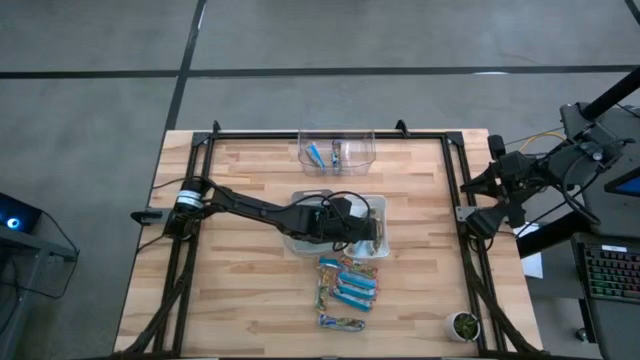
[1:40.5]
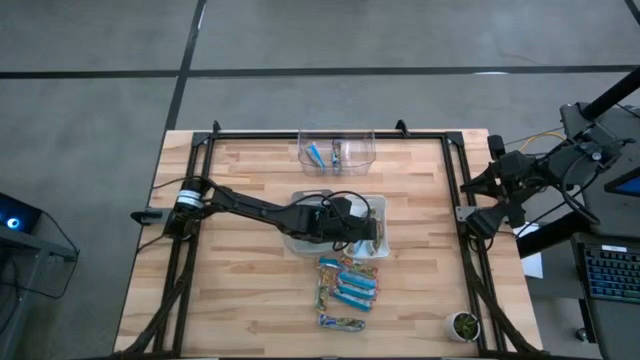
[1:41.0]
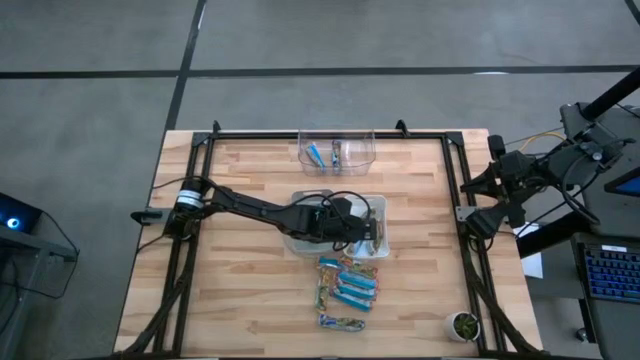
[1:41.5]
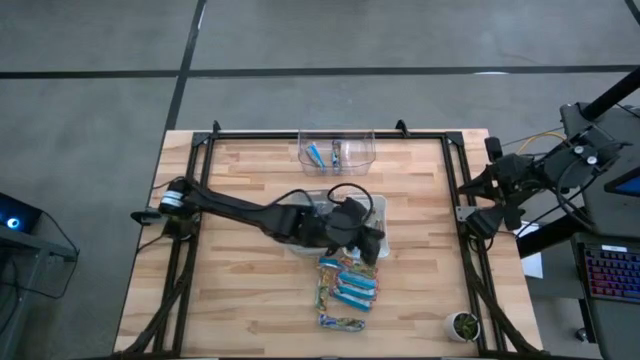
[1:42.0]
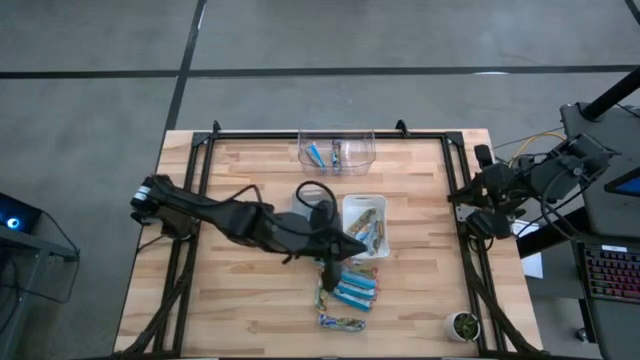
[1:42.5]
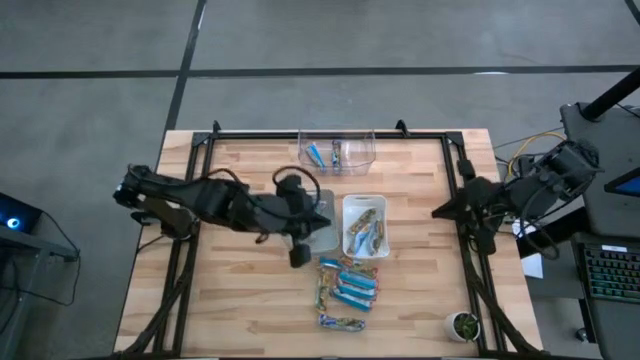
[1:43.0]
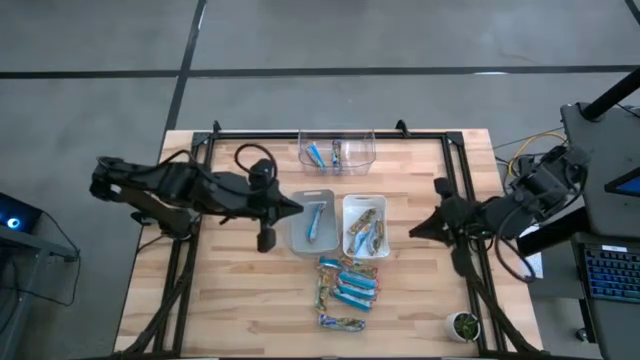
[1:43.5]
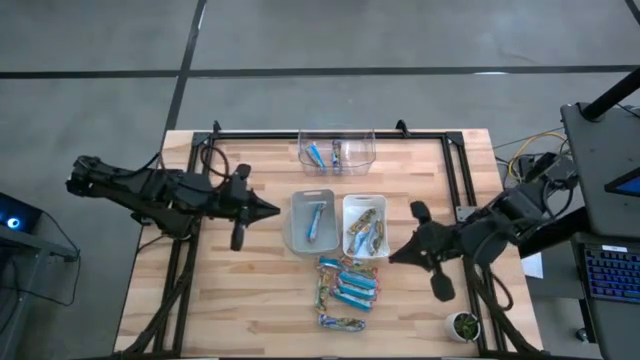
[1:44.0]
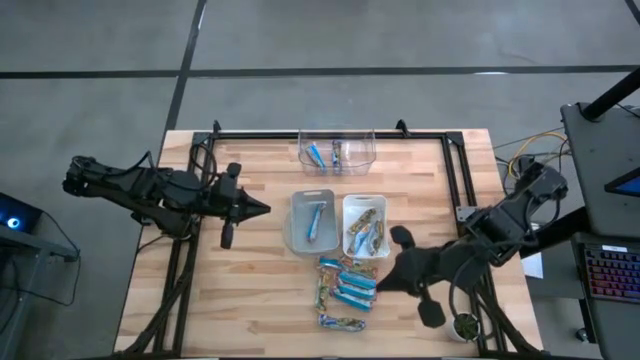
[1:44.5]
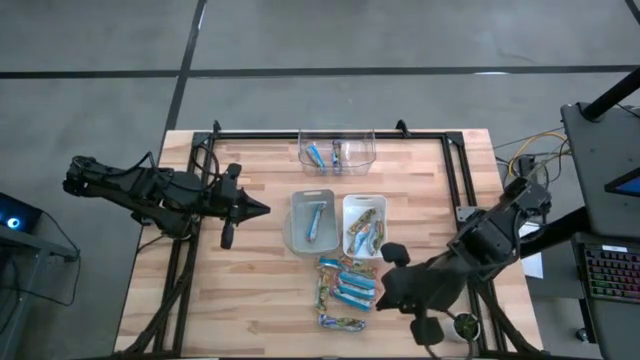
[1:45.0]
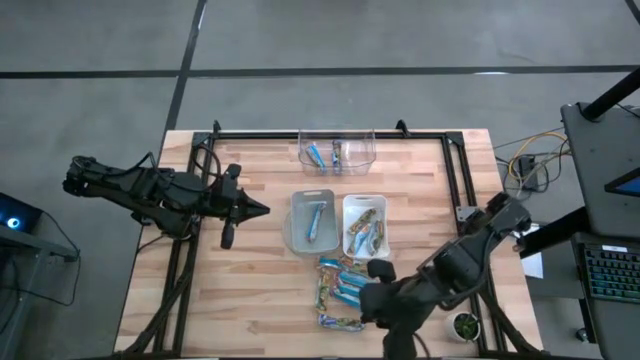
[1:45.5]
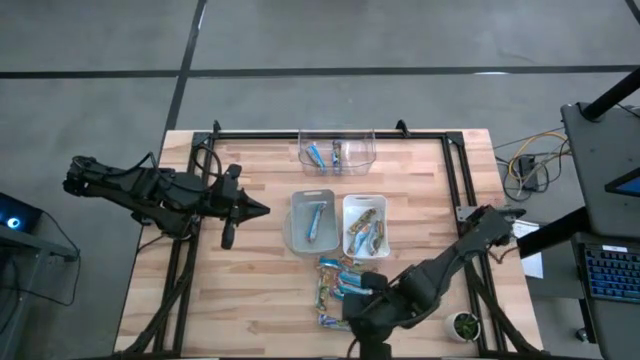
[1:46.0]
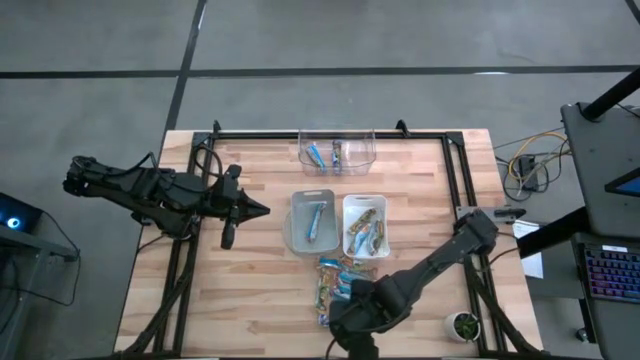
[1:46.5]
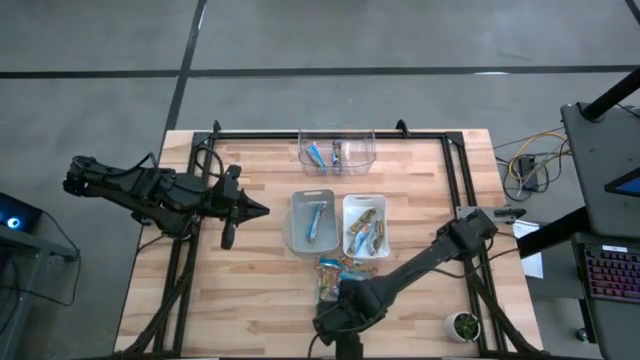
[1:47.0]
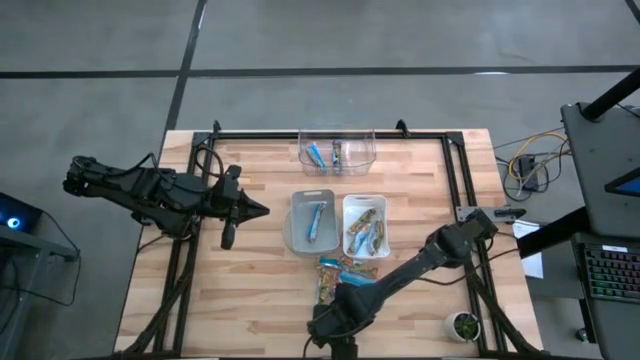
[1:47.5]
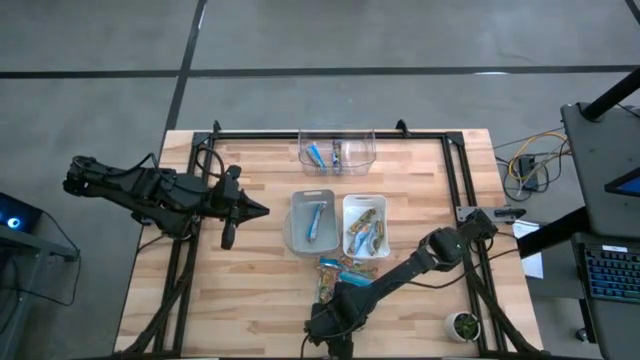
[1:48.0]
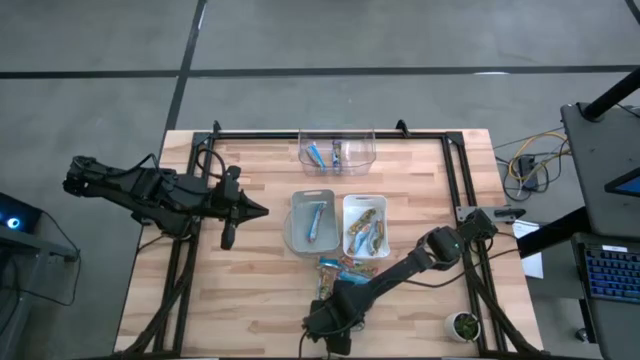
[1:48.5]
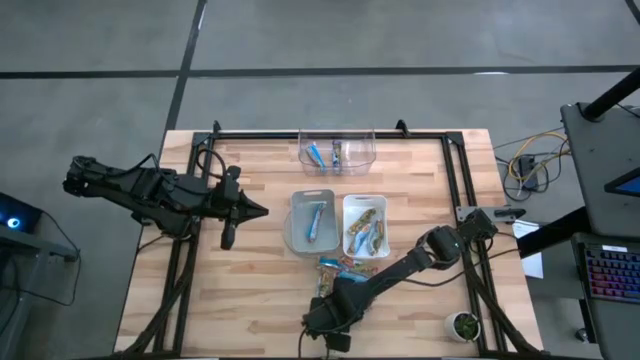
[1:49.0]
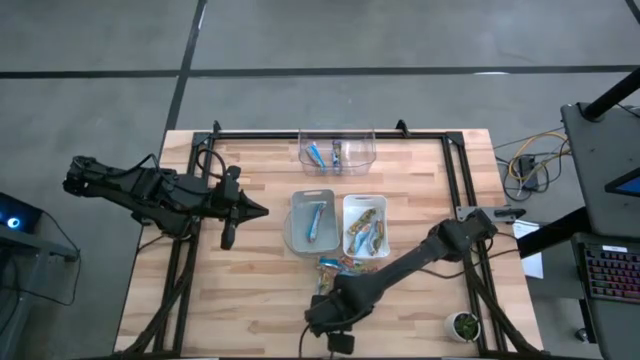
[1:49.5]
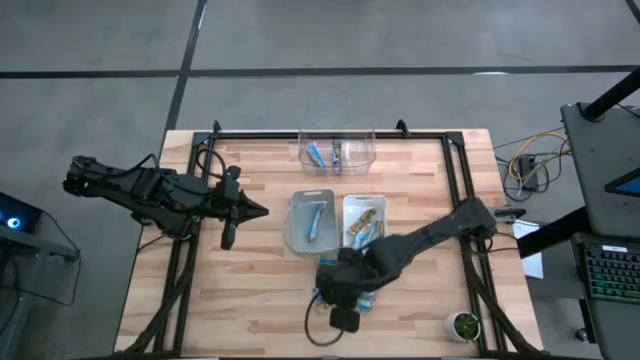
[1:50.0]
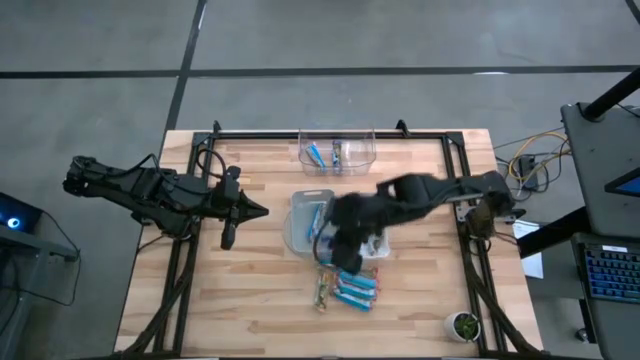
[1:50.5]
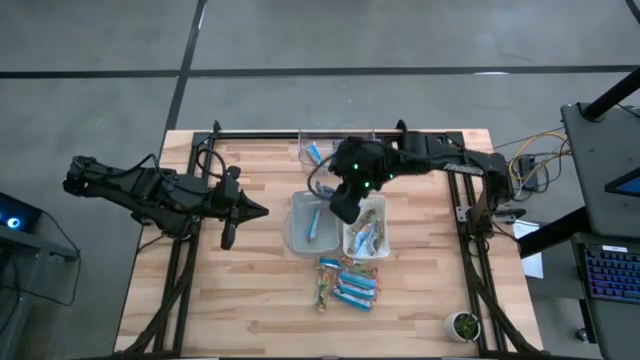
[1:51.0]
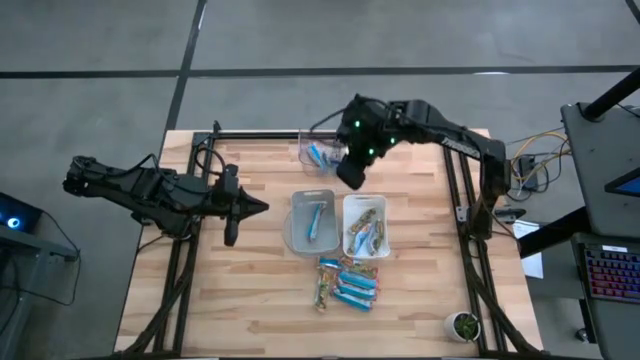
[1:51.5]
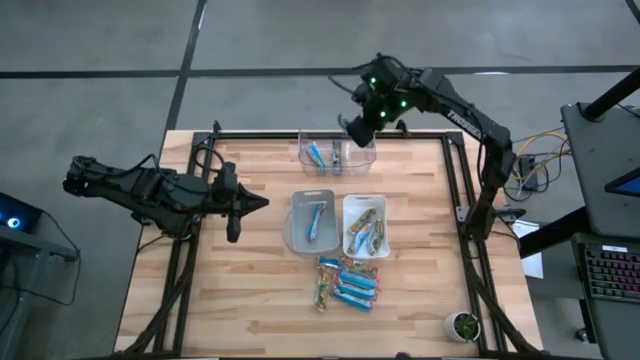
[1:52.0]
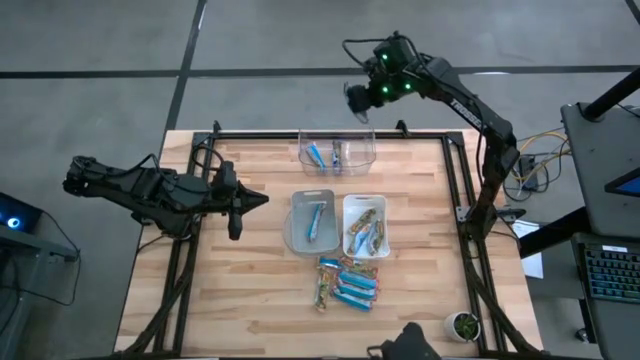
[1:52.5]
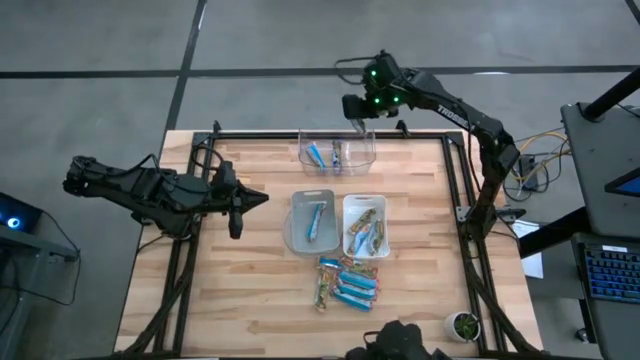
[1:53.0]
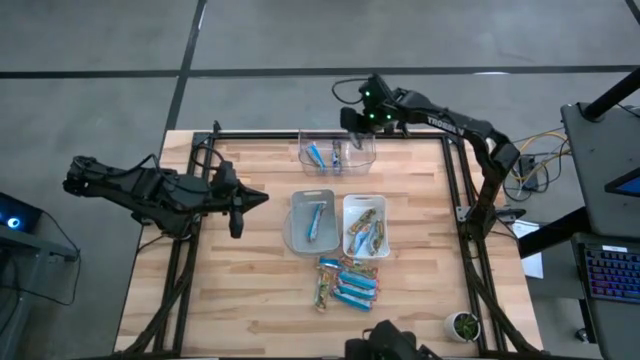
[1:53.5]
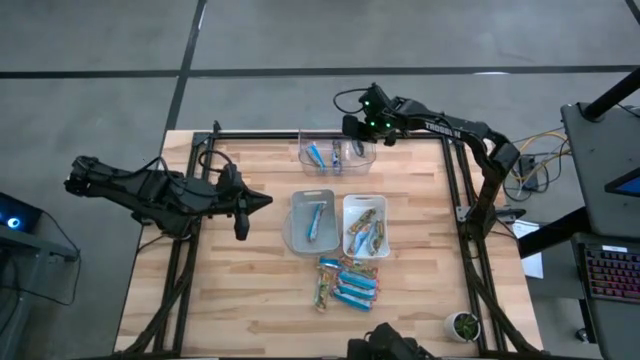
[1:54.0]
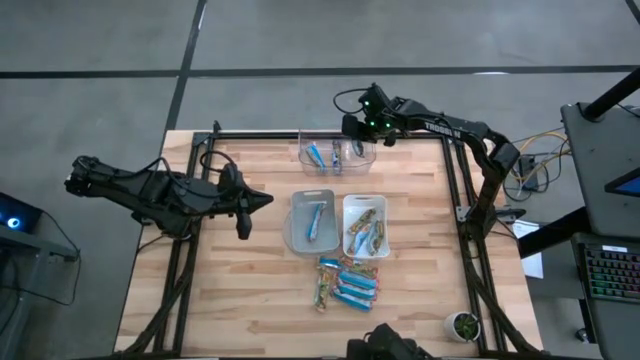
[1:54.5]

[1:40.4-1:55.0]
Task: Pick and place Granola Bars by type
Put the blue granola bar into the transparent bin

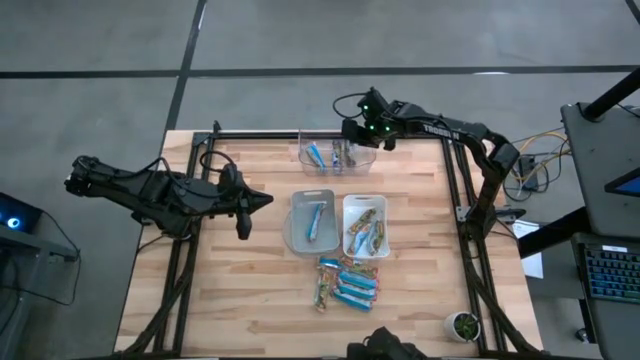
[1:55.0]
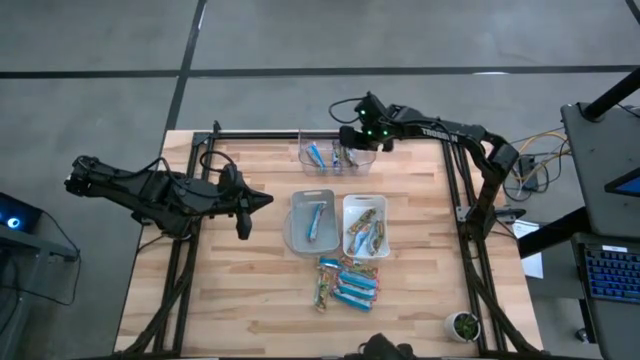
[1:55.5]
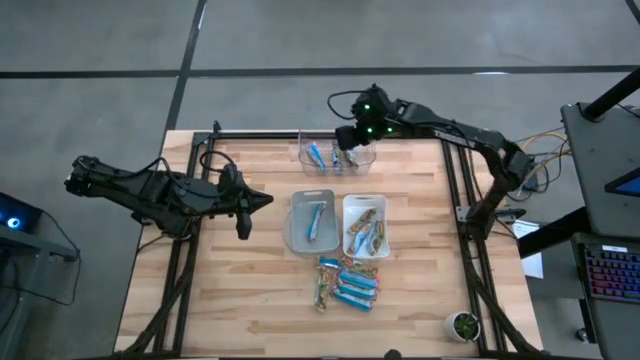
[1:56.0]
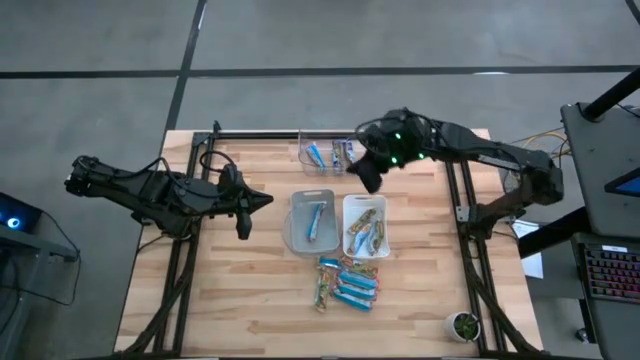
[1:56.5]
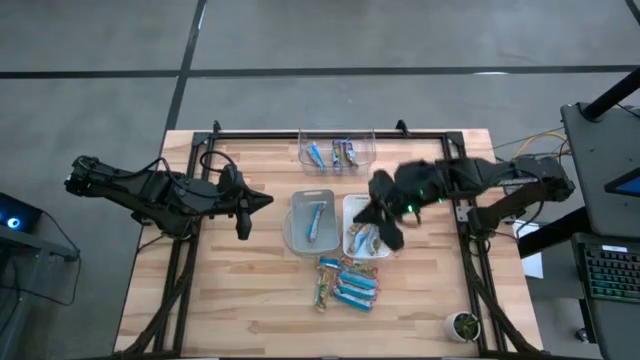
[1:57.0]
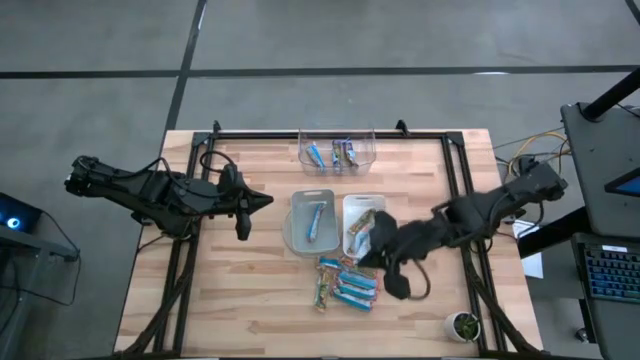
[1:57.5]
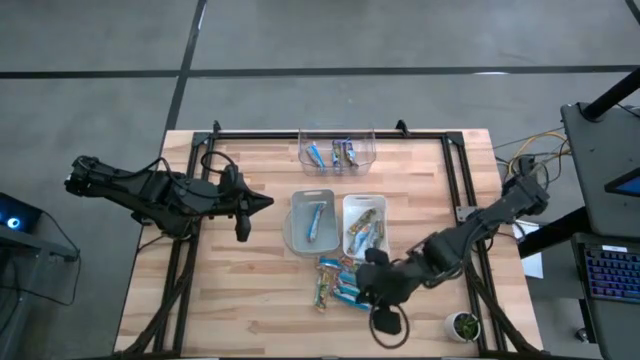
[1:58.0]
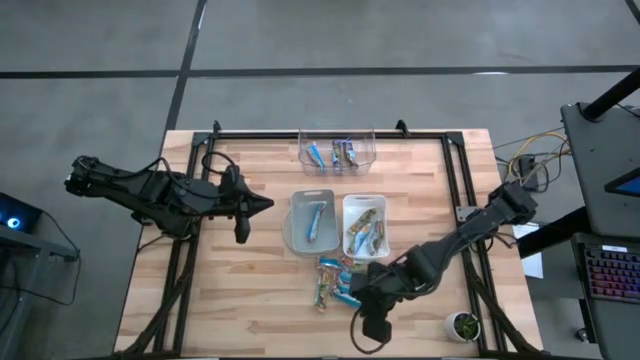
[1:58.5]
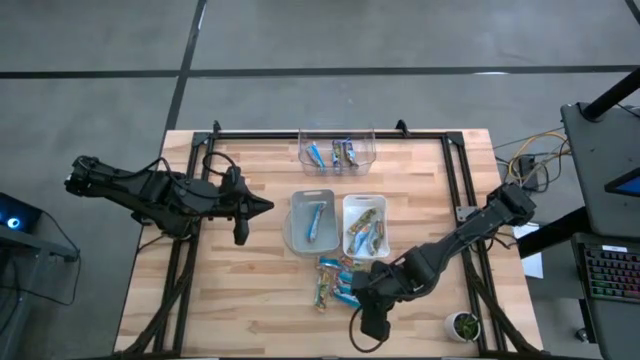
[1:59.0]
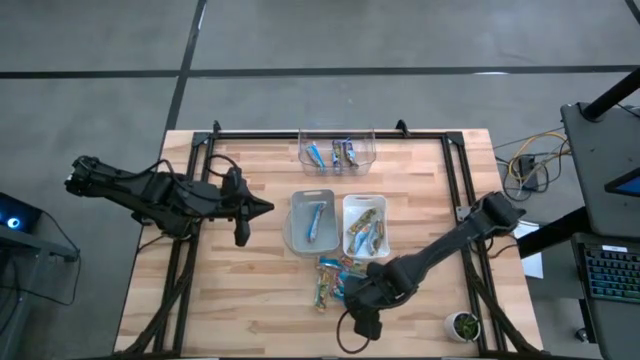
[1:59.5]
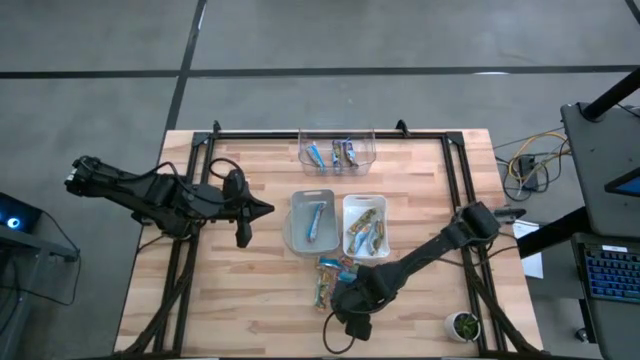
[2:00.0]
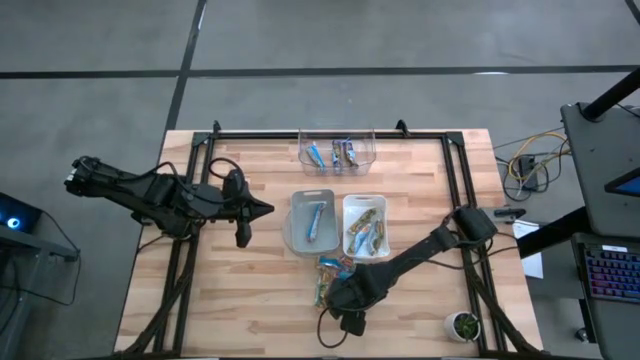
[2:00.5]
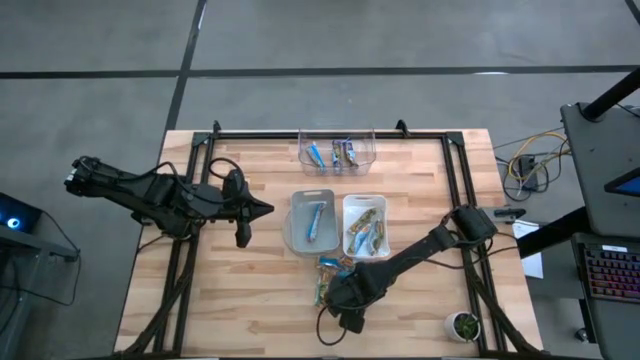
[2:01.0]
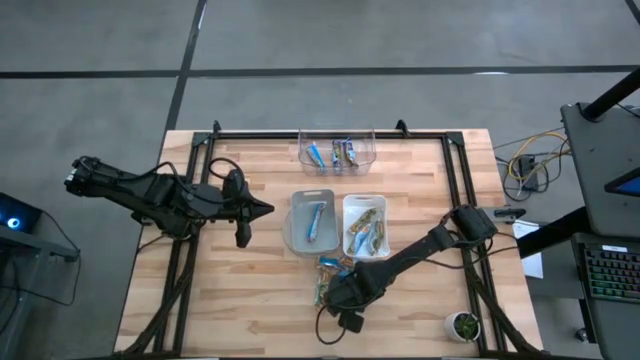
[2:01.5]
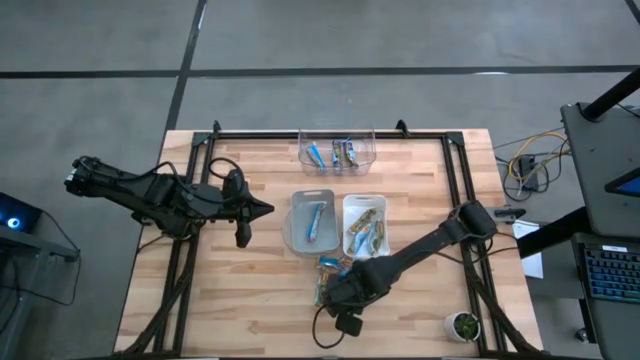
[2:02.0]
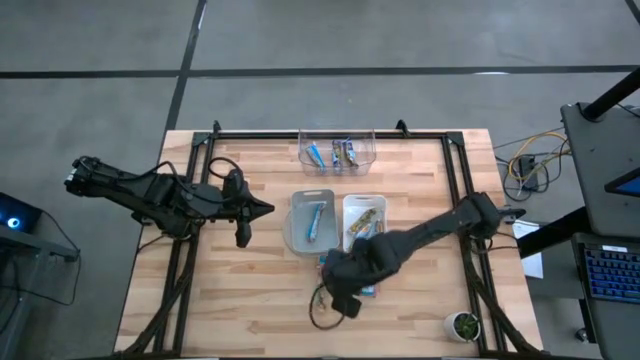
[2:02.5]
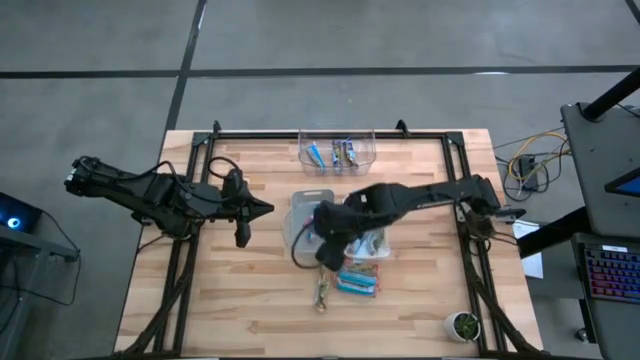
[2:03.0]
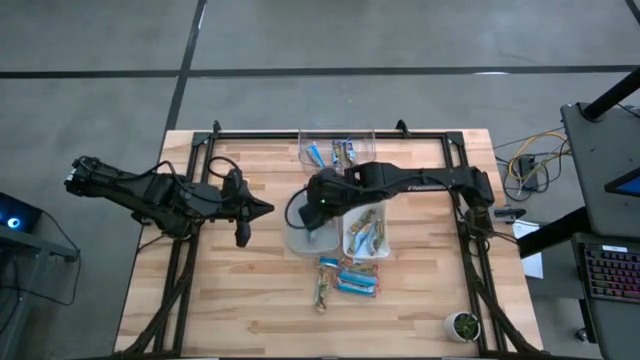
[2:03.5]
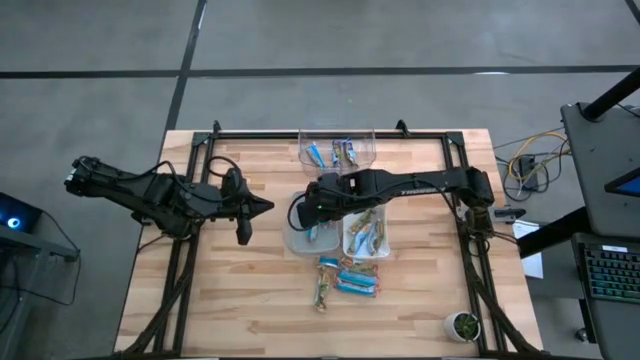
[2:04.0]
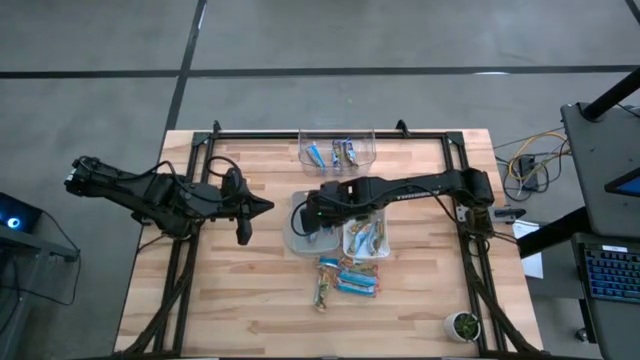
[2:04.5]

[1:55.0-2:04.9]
Put the red granola bar into the gray bin
